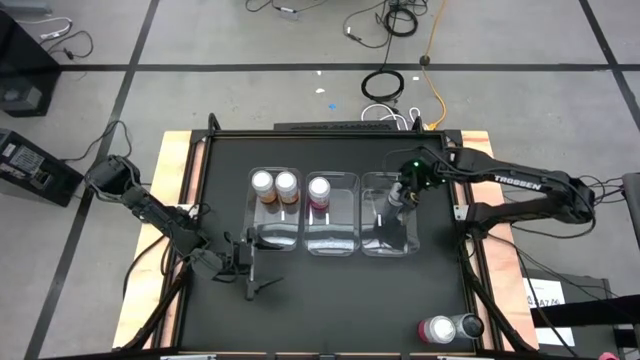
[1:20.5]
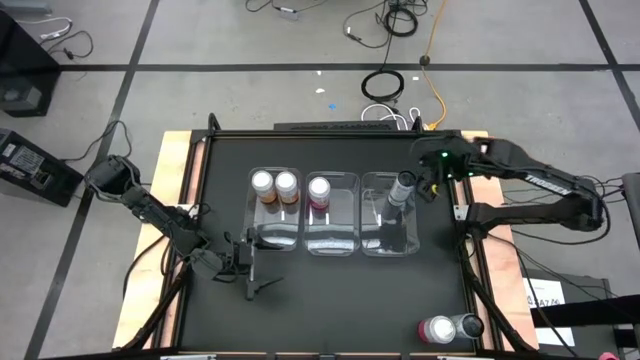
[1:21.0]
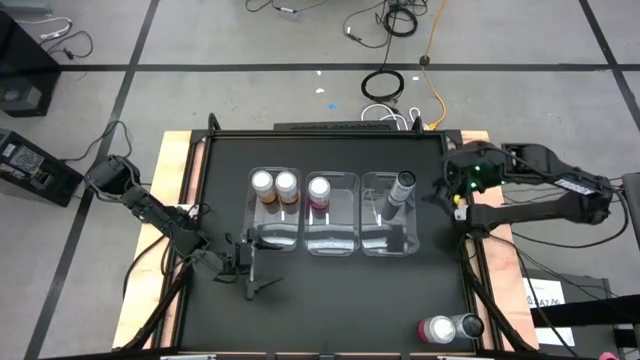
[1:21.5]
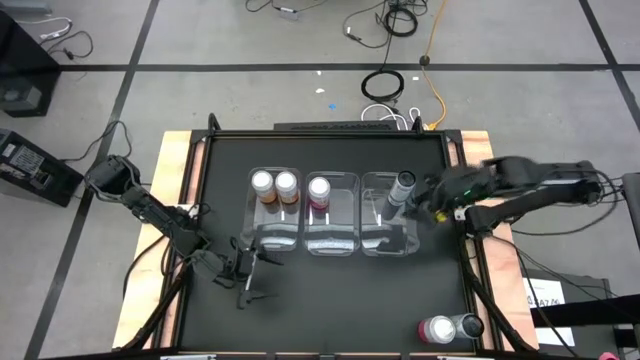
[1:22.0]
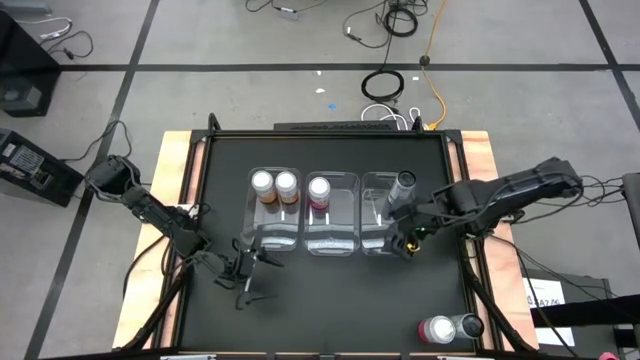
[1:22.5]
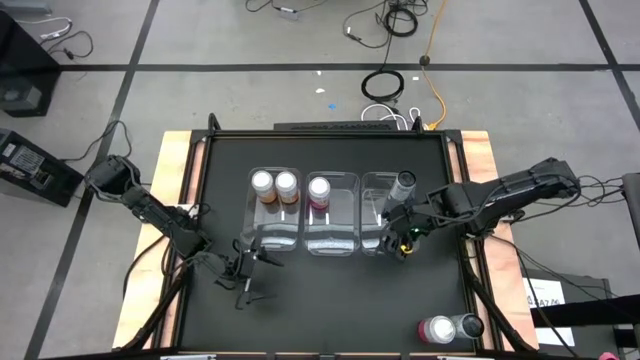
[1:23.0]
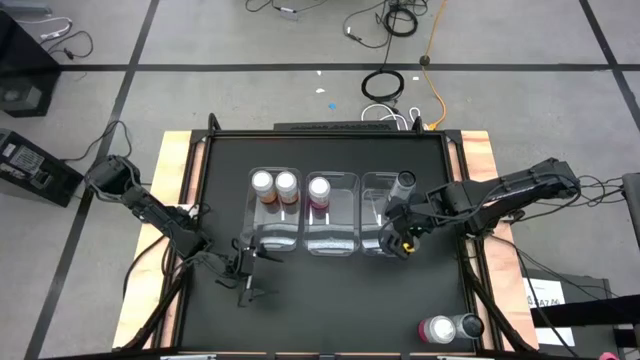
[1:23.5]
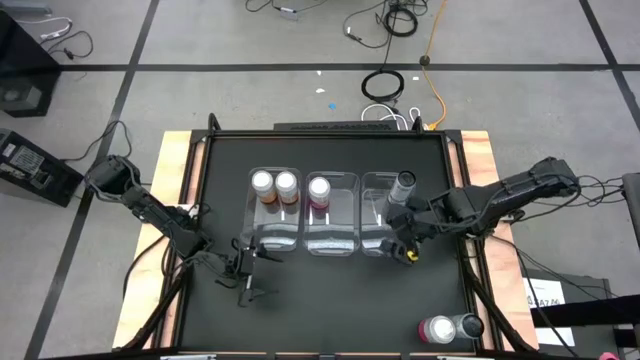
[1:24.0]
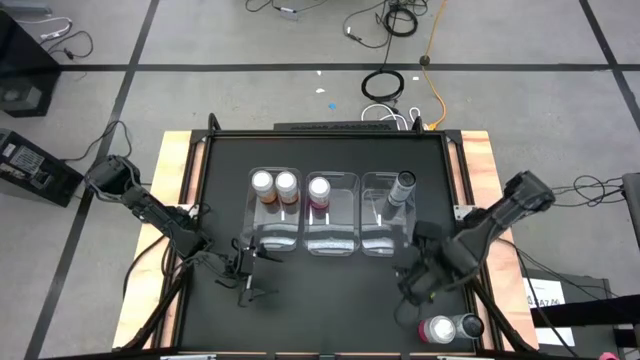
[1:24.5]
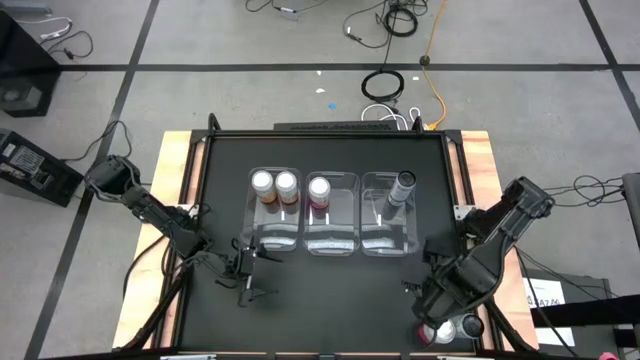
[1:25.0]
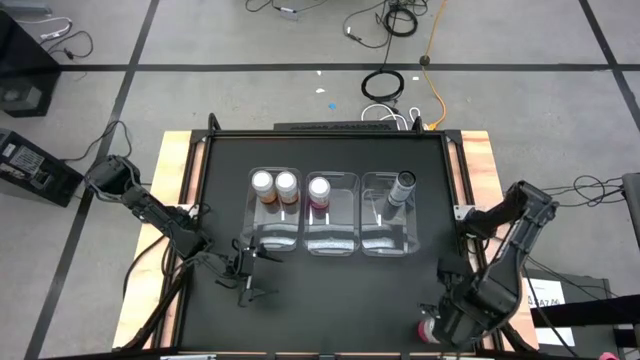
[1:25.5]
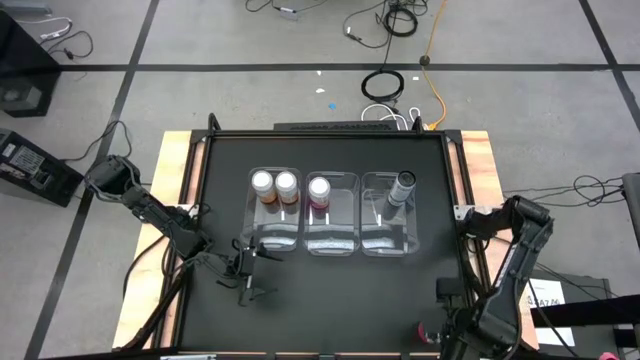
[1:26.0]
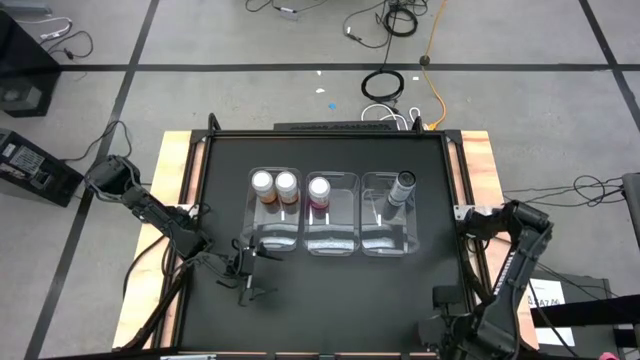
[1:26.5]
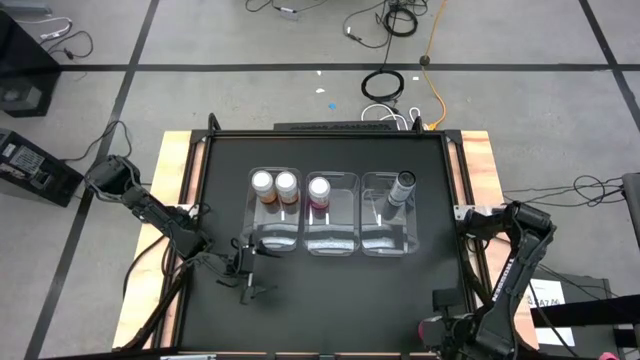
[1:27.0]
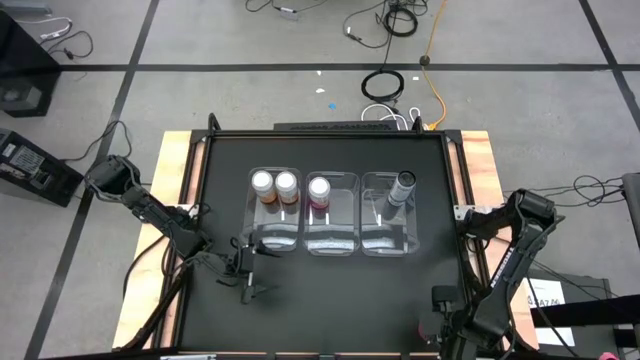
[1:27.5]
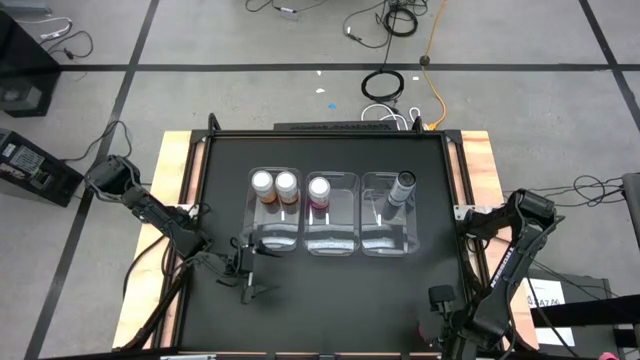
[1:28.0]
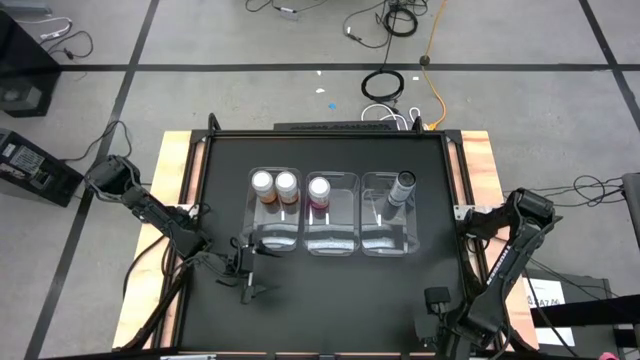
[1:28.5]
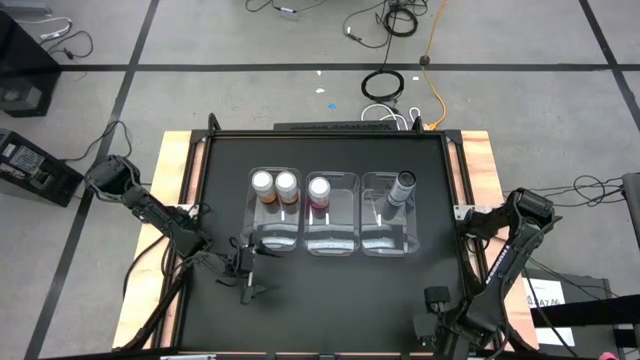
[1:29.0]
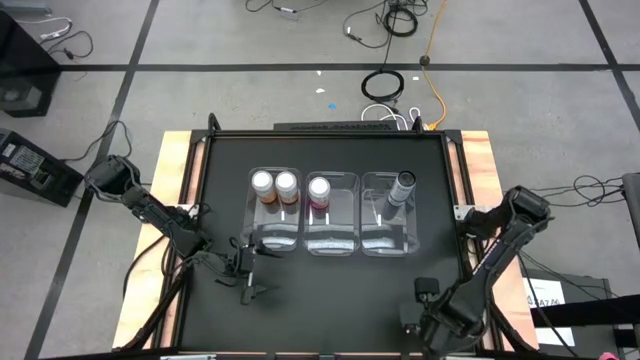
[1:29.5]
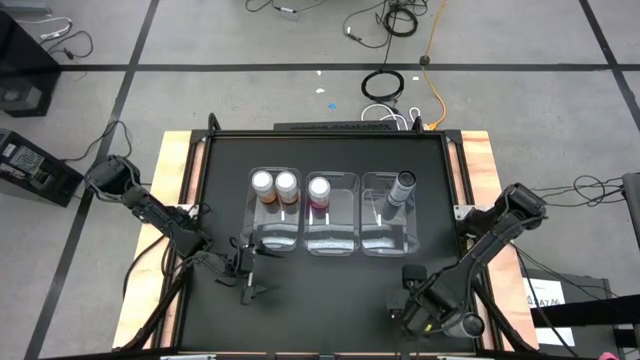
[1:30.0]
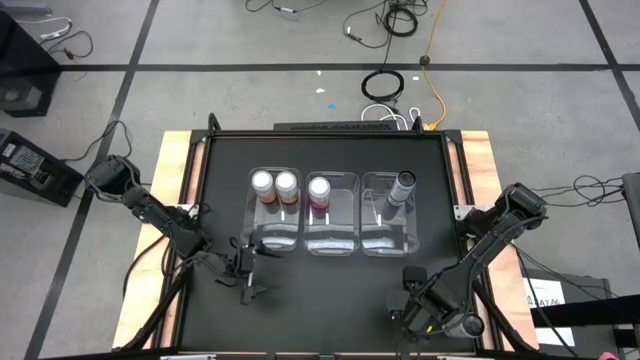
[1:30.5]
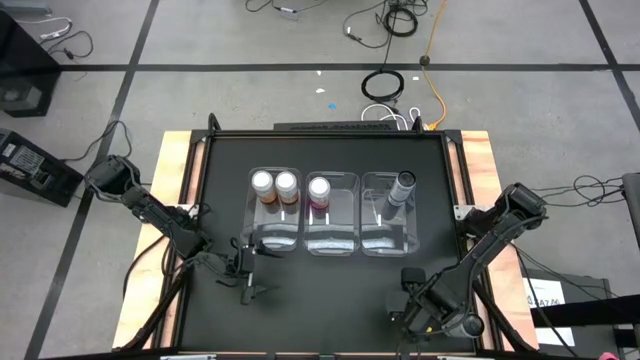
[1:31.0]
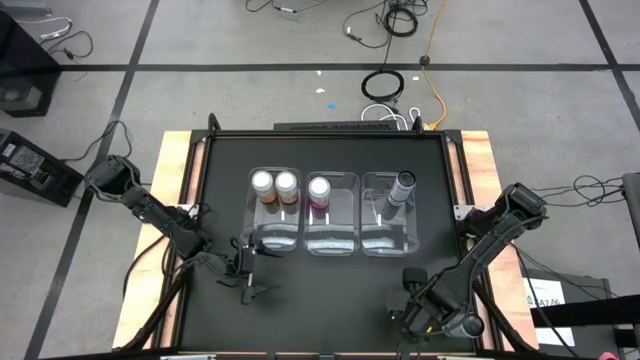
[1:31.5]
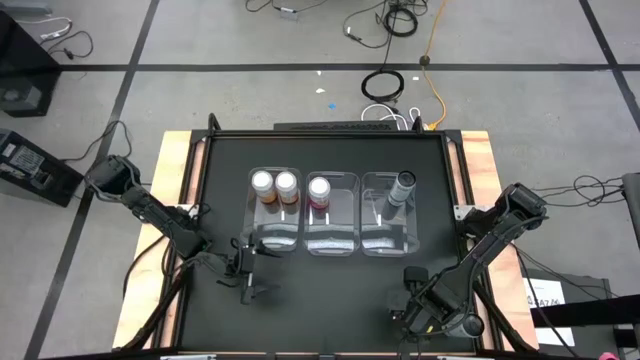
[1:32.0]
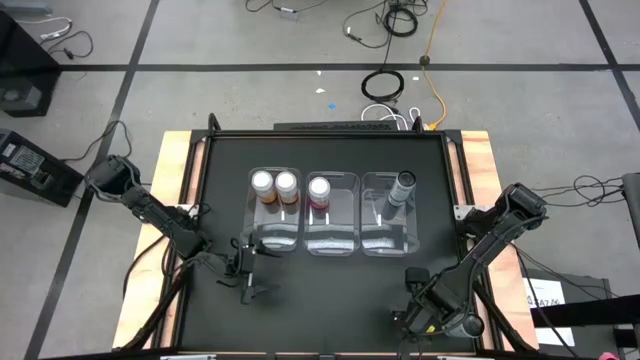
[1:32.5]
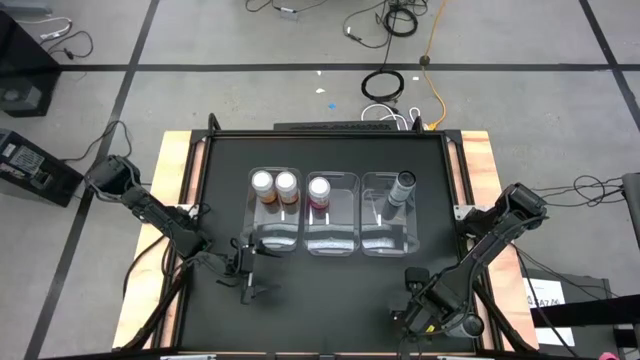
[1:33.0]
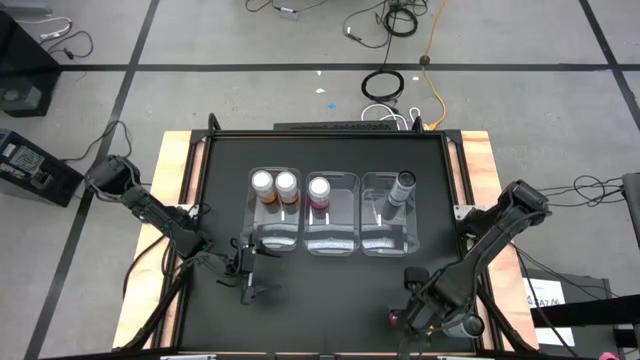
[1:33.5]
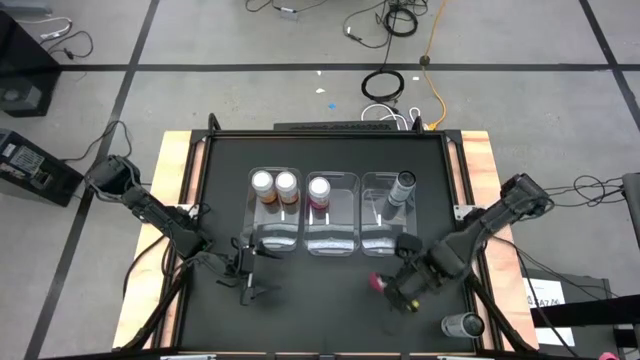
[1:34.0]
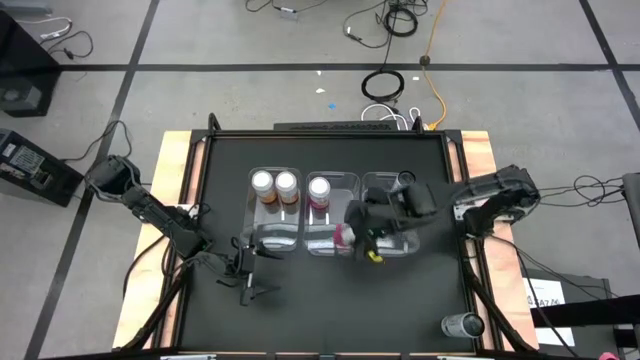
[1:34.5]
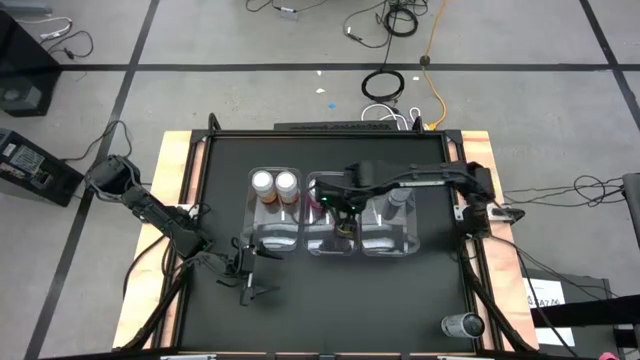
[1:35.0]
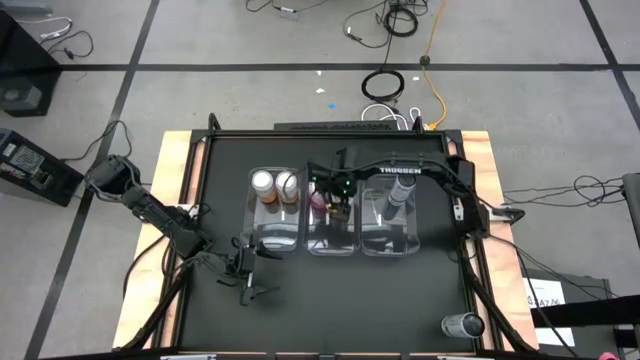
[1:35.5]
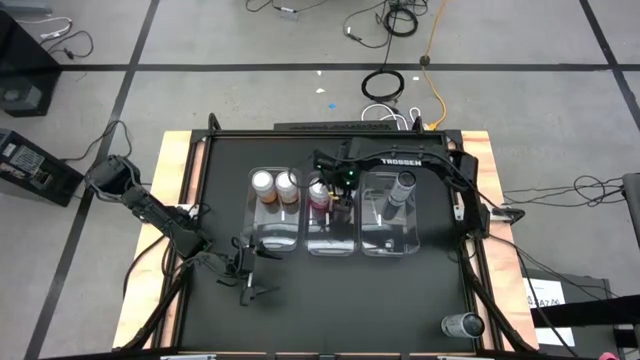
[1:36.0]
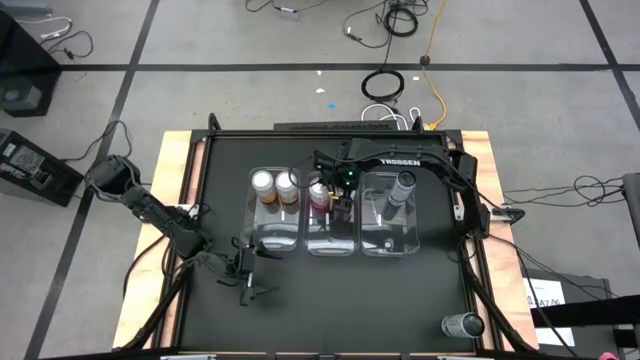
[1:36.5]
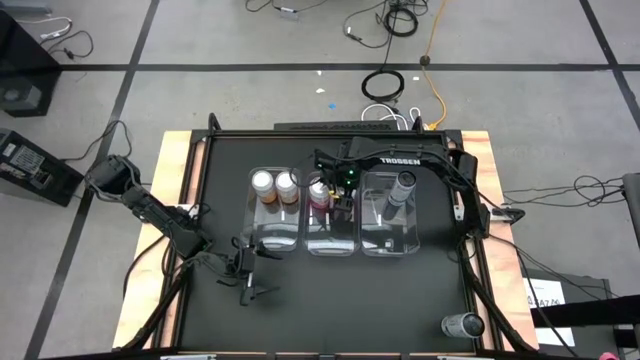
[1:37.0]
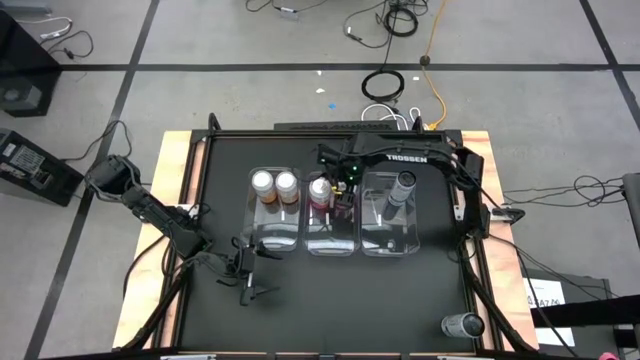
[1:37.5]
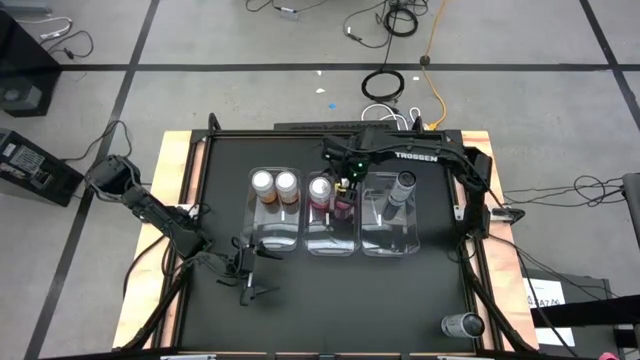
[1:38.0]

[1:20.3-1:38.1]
Task: Sort soda cans
Put the right pink-white soda can into the center transparent bin

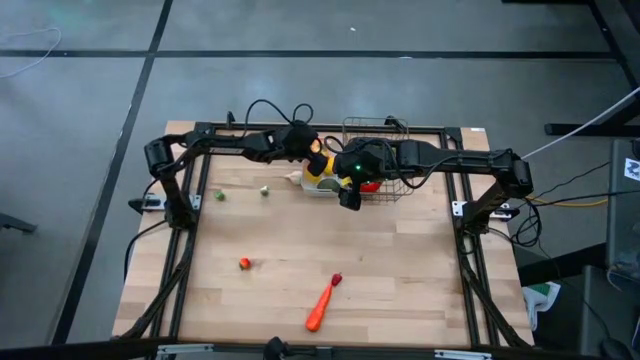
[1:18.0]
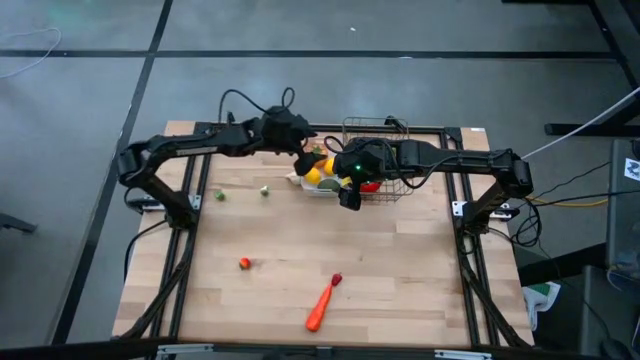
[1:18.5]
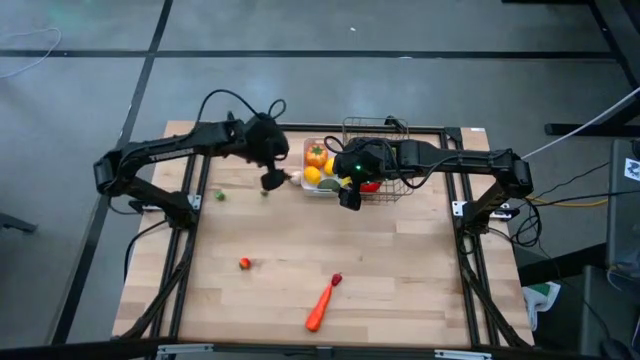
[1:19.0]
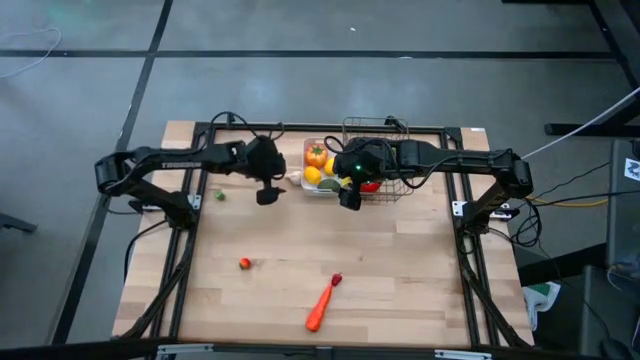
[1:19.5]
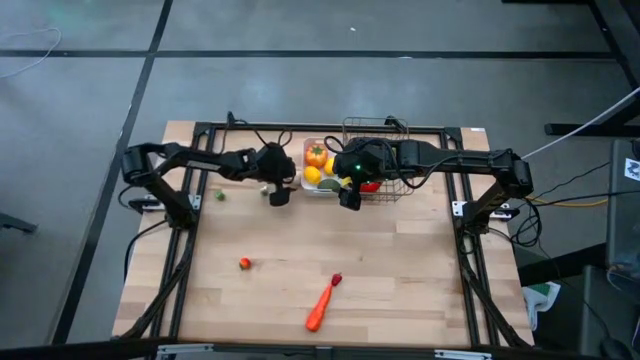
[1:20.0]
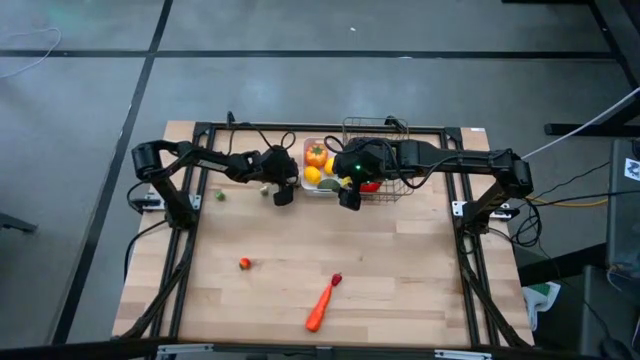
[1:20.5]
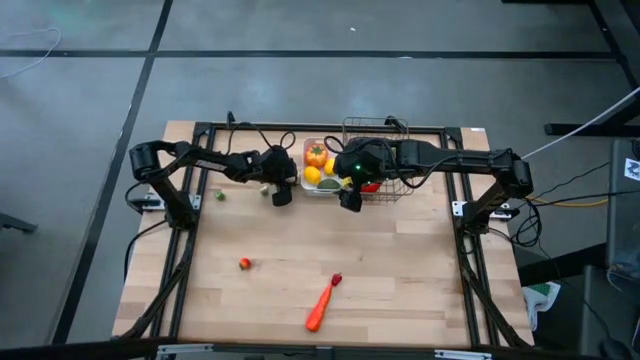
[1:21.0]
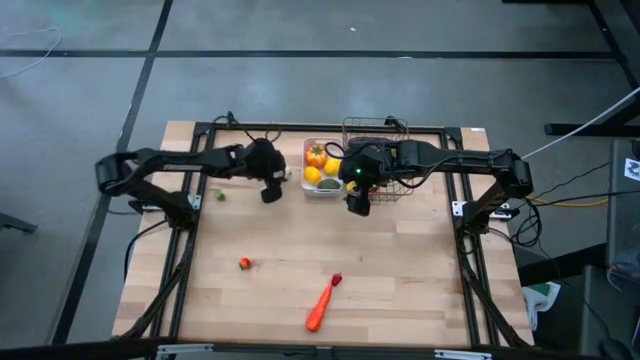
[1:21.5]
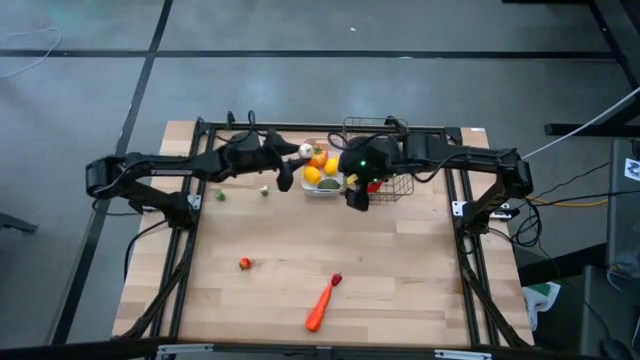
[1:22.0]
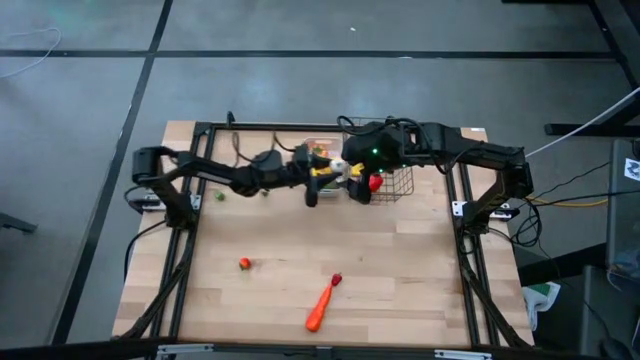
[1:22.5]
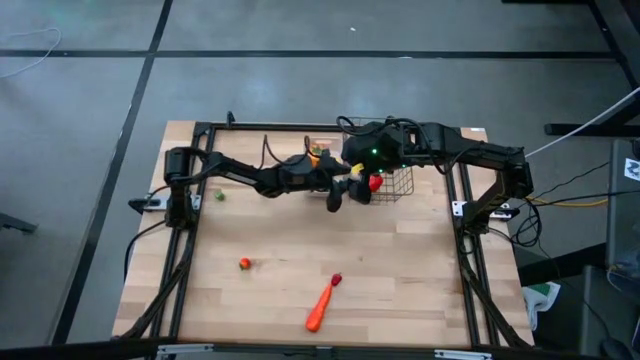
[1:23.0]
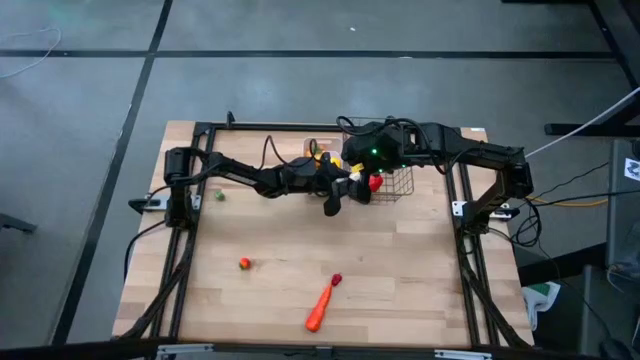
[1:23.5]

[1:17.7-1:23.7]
Task: Sort produce into baskets
Put the white garlic into the gold wire basket
